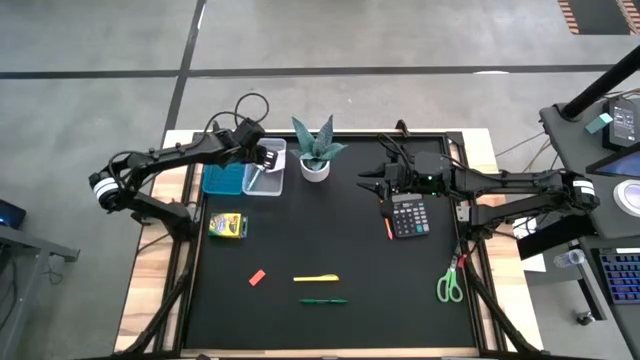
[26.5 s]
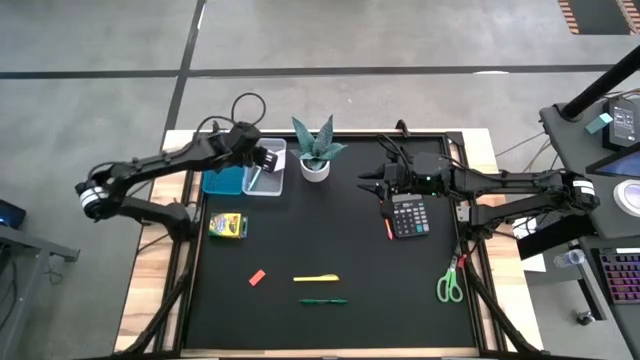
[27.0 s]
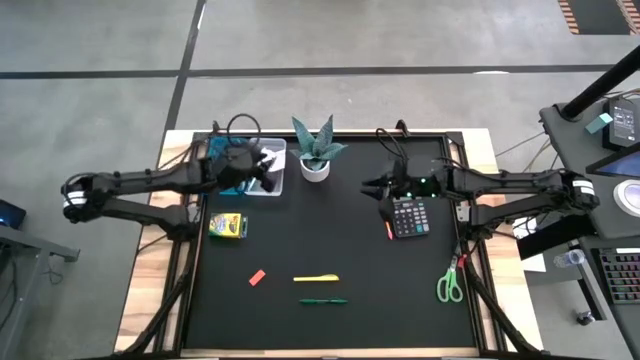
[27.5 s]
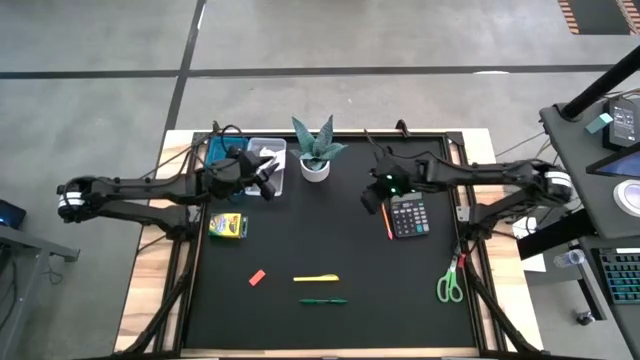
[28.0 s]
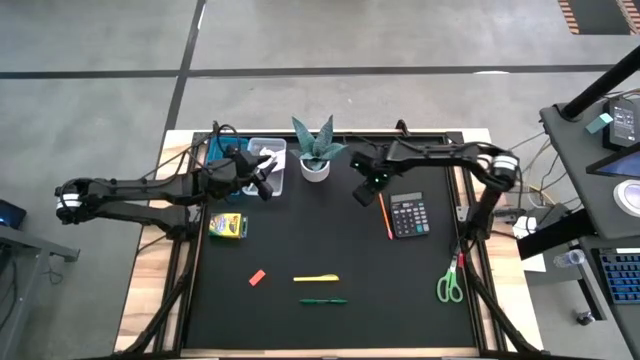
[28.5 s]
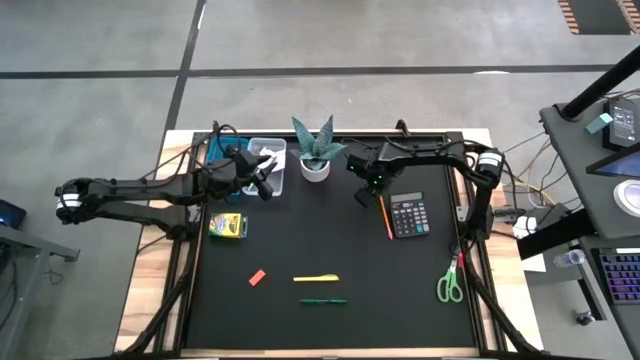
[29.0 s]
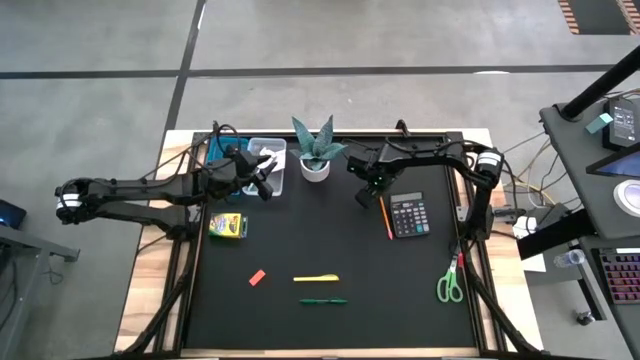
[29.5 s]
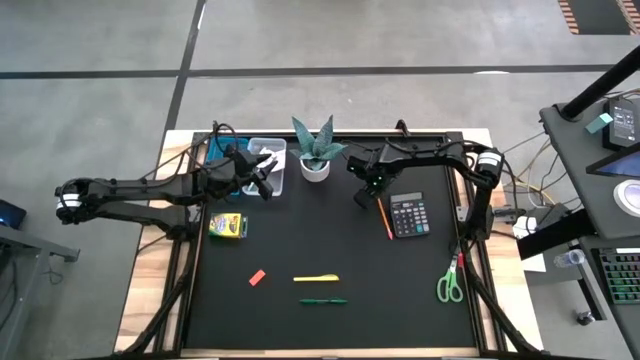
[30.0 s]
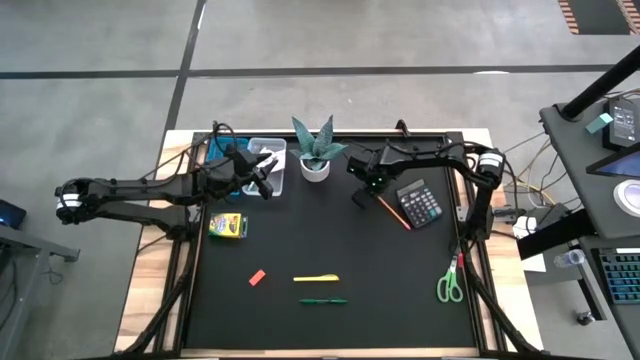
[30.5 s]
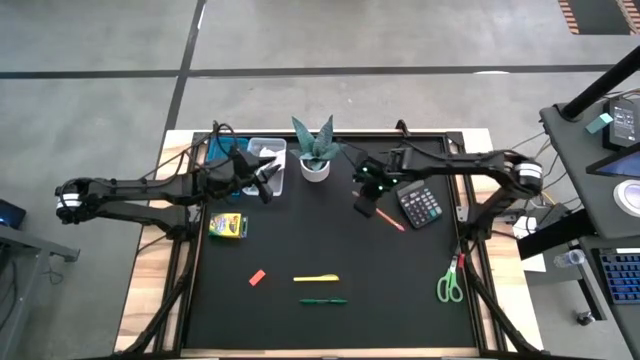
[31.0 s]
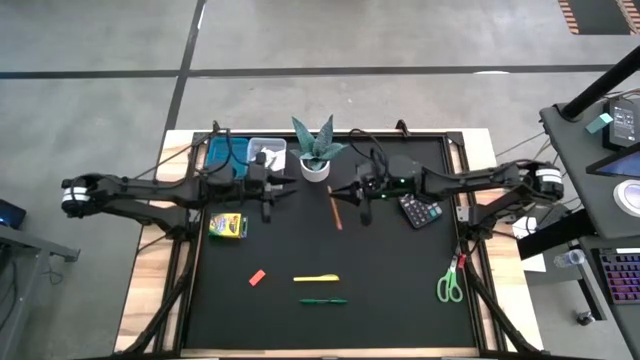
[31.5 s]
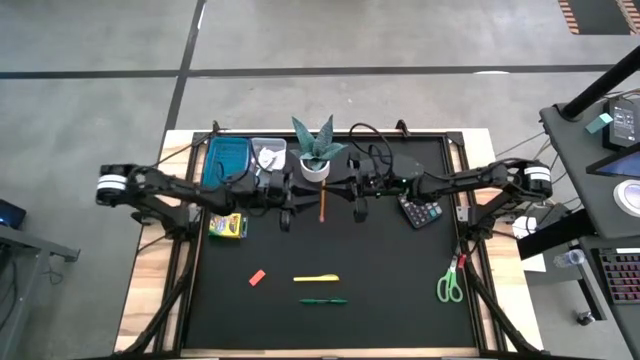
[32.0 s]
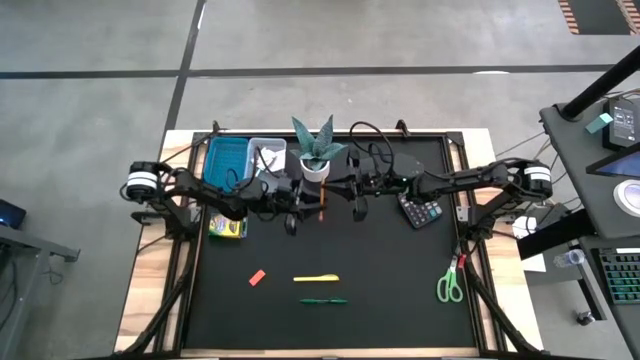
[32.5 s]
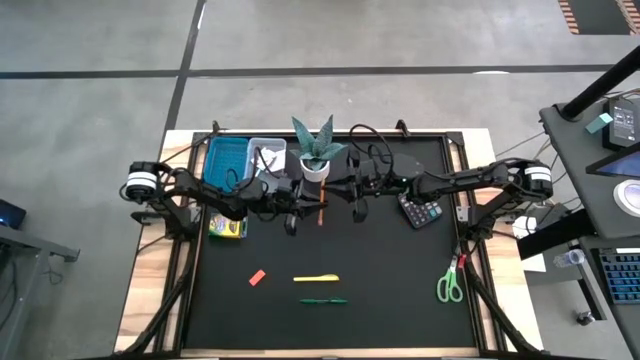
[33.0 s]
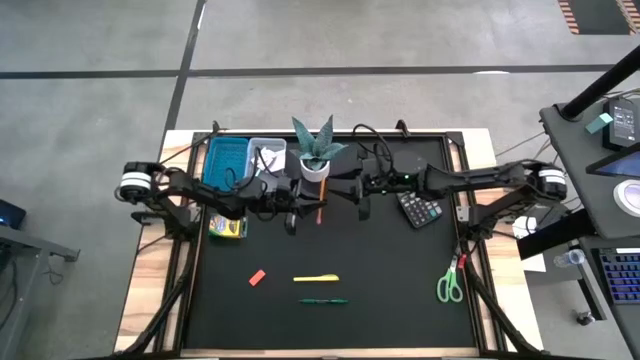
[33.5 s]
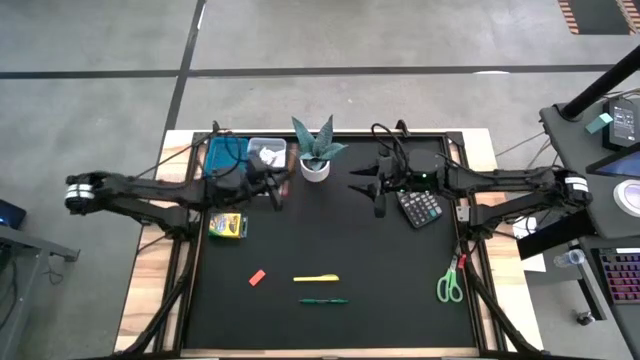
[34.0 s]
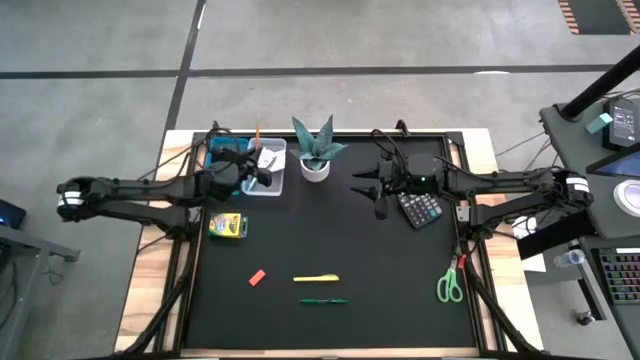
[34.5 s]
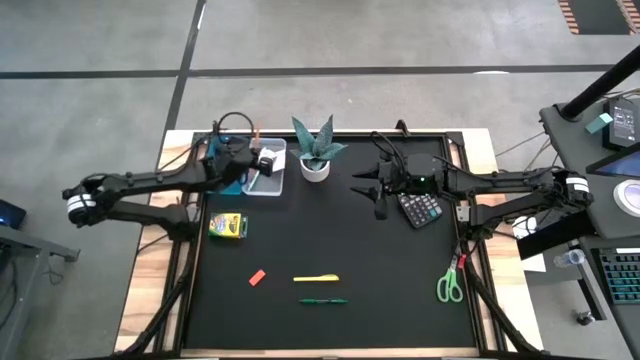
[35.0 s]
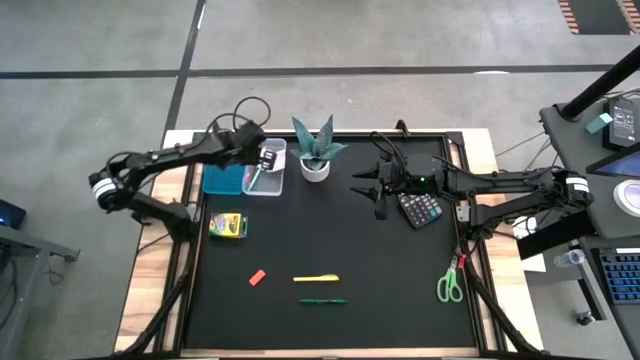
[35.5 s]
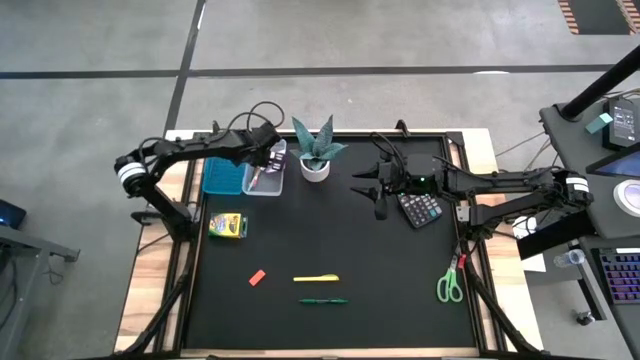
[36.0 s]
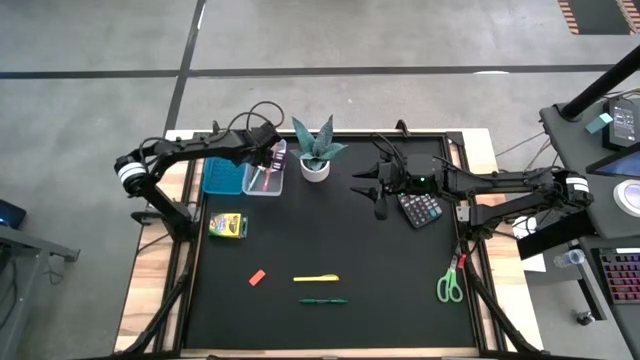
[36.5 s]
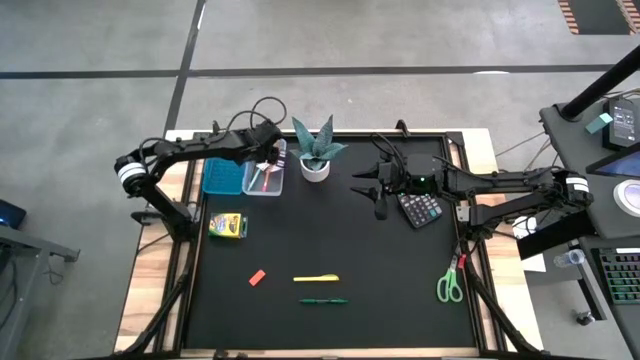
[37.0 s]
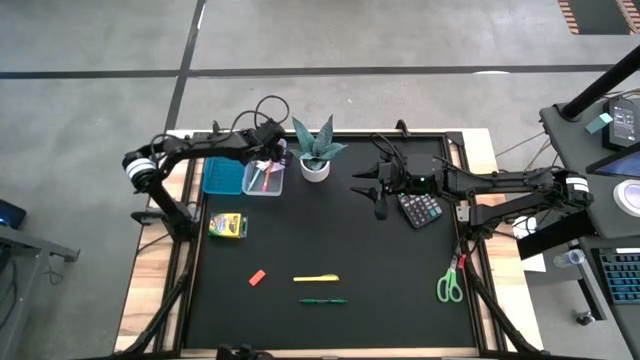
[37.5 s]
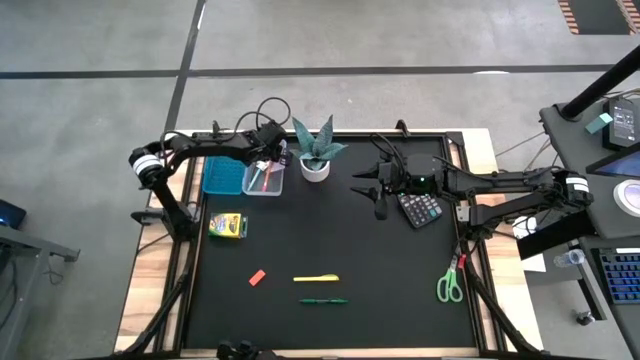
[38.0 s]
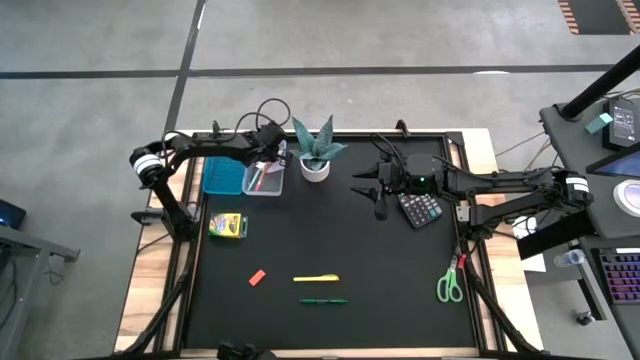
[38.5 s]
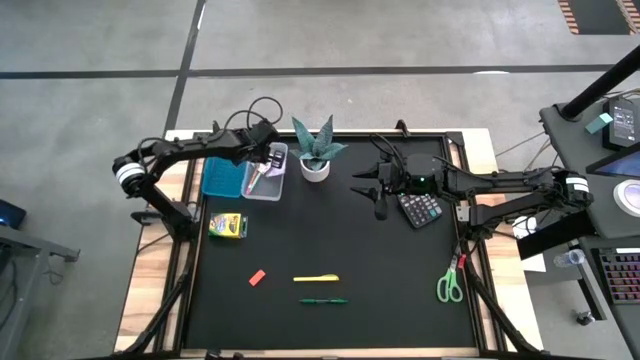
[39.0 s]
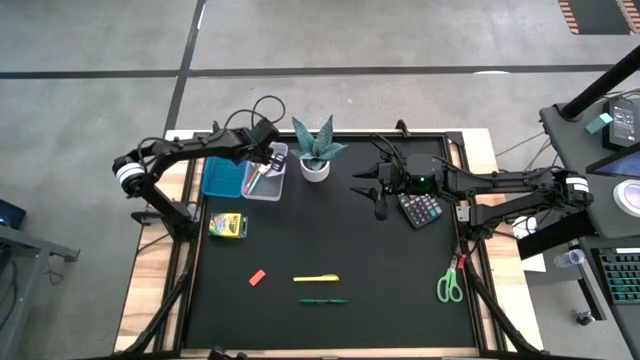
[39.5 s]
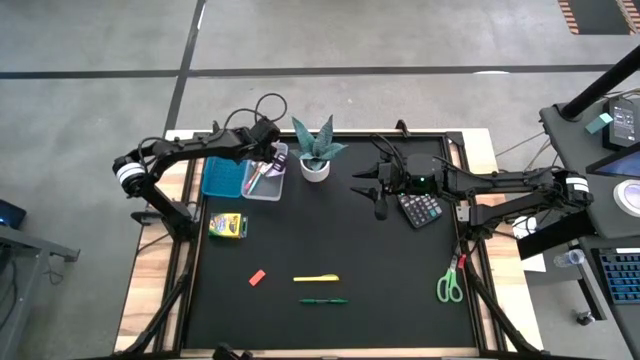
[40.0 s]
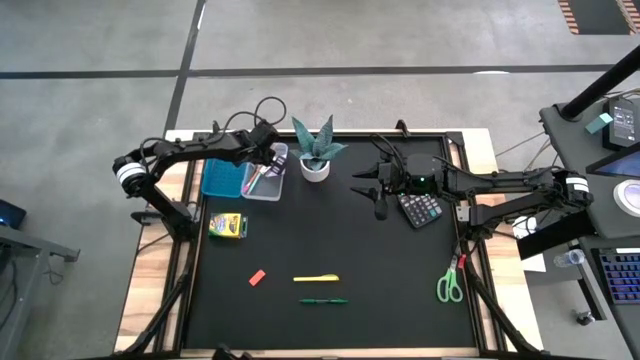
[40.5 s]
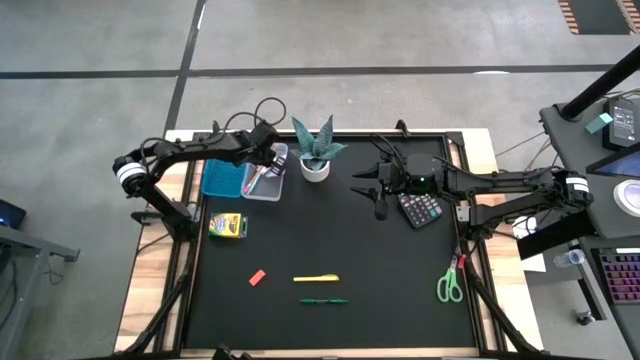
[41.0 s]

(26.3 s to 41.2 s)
Task: Pack school essentials
Put the orange pencil into the blue supply box

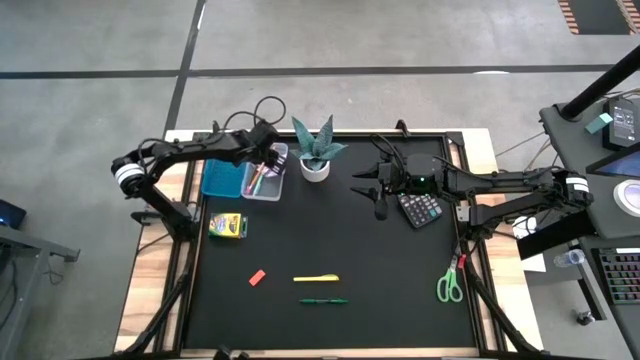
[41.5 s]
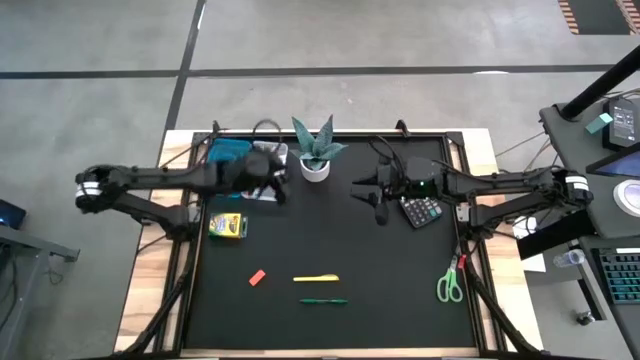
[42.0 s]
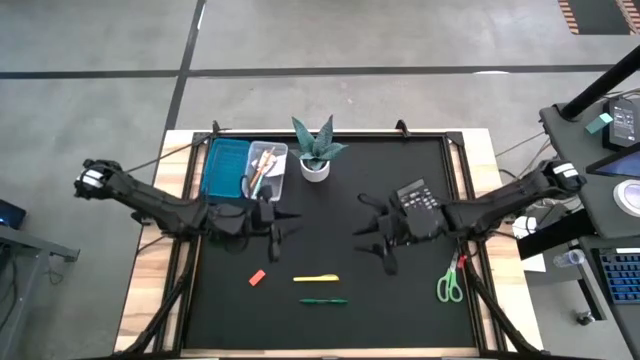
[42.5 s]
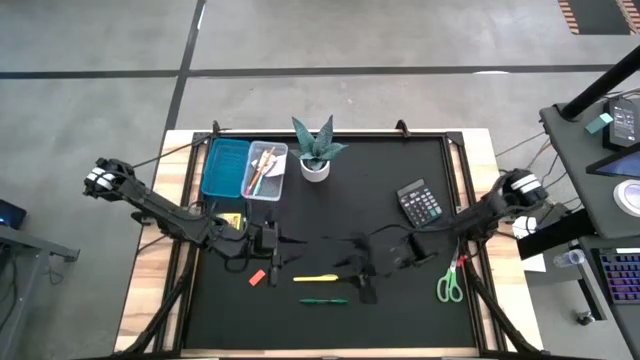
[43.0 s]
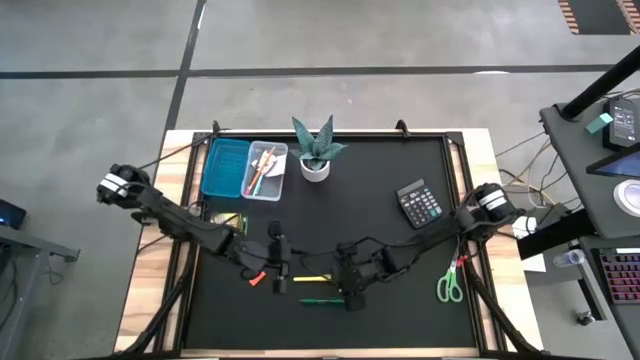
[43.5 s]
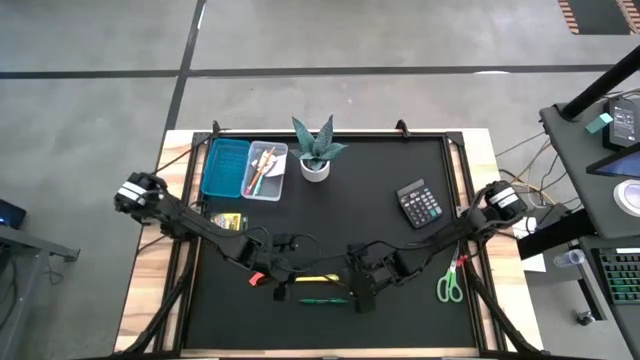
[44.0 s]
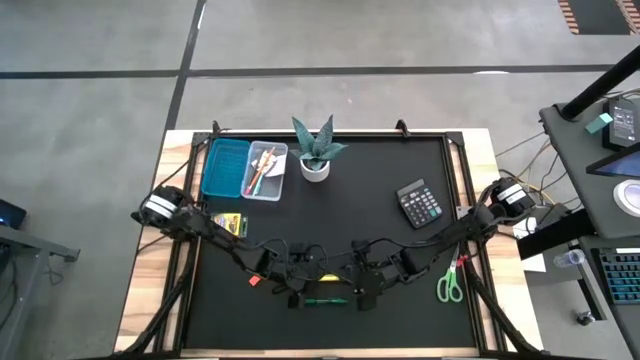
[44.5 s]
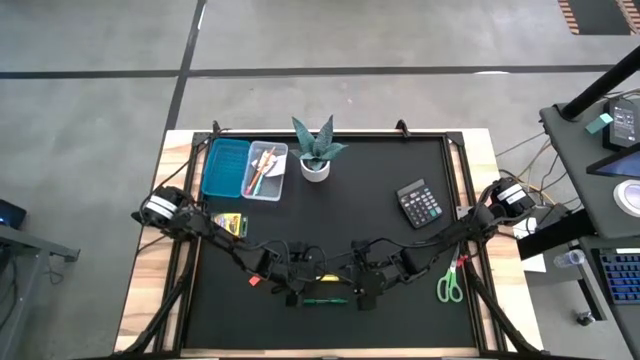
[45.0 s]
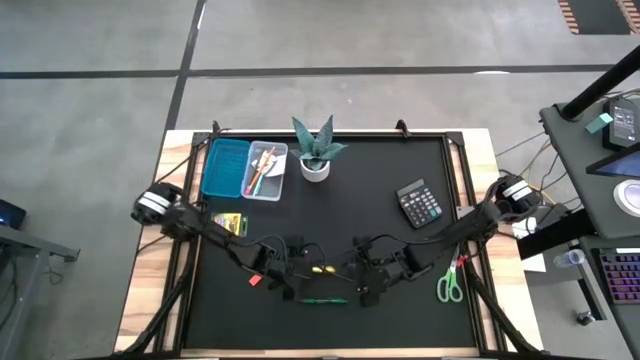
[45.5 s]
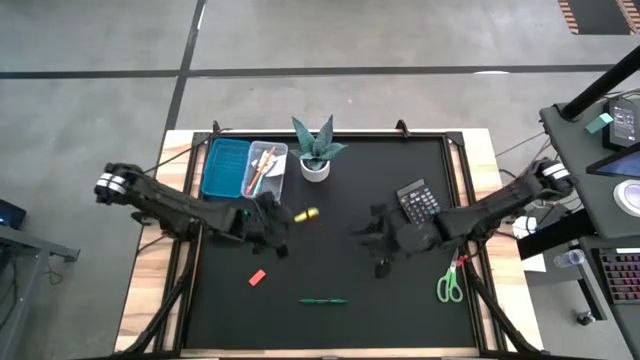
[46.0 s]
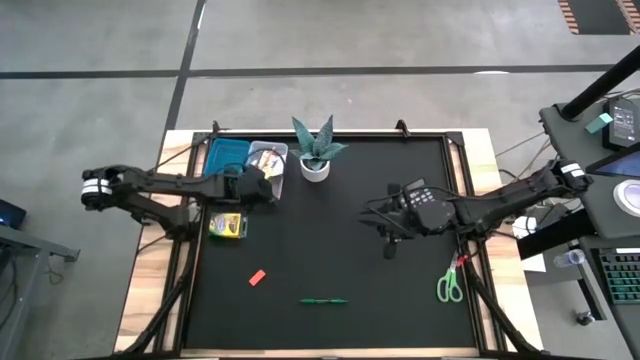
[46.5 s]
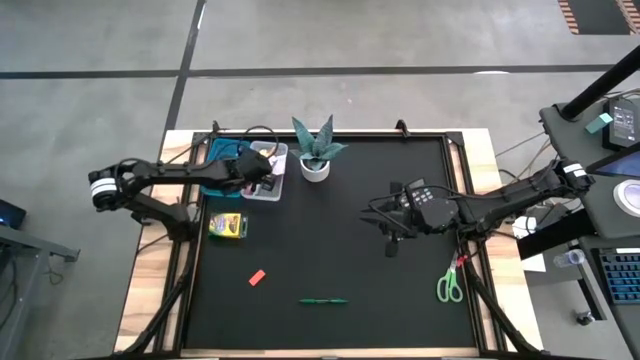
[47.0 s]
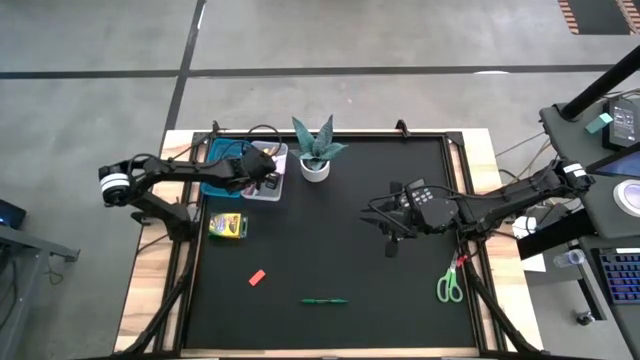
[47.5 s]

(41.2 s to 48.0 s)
Put the yellow pen into the blue supply box
